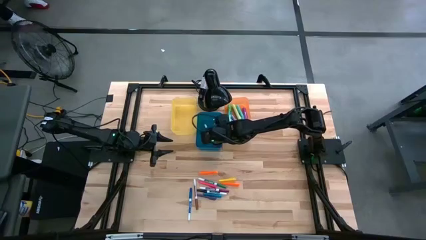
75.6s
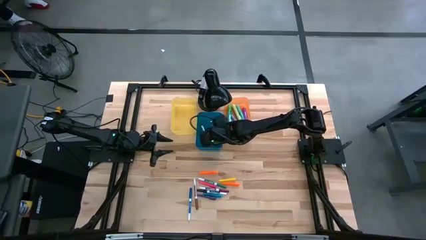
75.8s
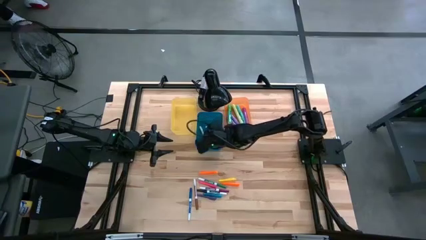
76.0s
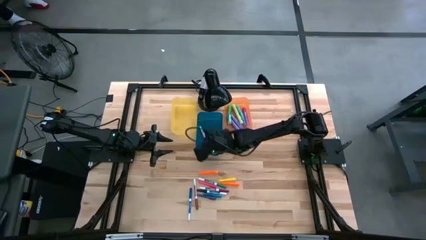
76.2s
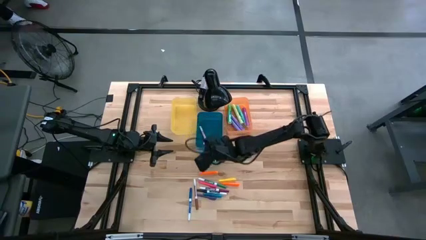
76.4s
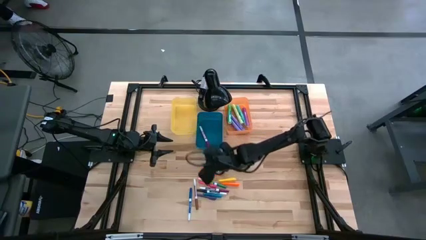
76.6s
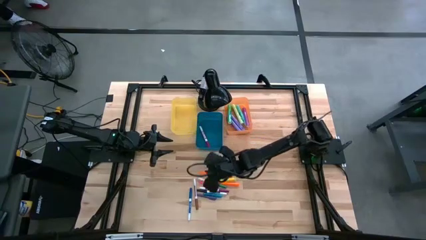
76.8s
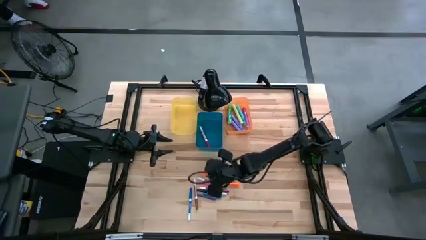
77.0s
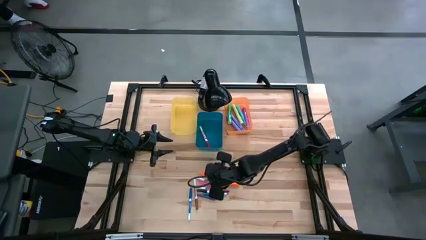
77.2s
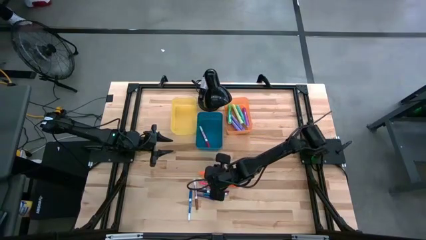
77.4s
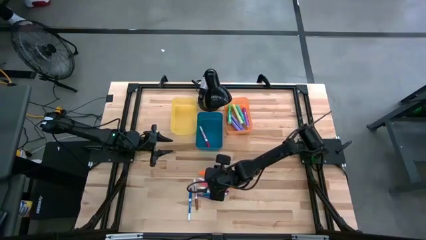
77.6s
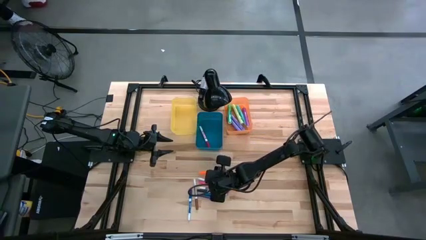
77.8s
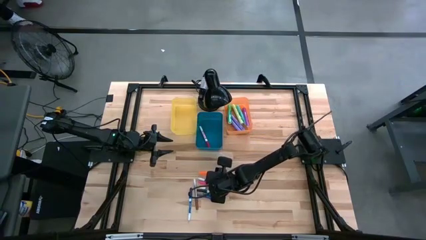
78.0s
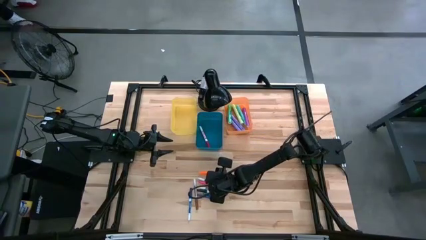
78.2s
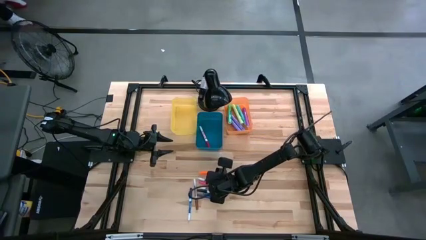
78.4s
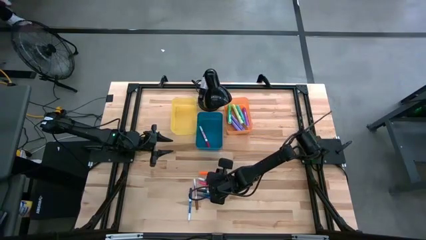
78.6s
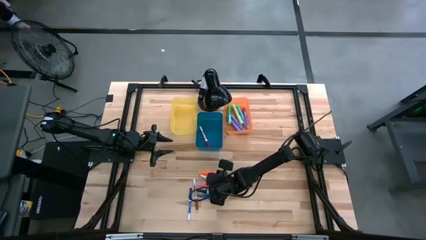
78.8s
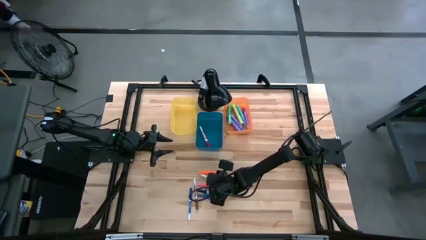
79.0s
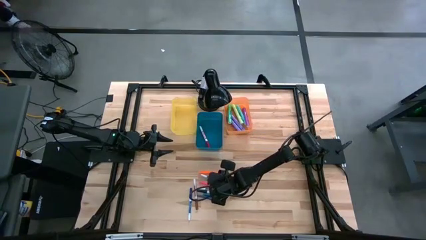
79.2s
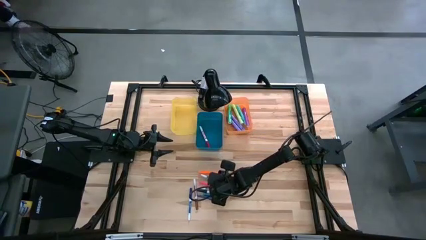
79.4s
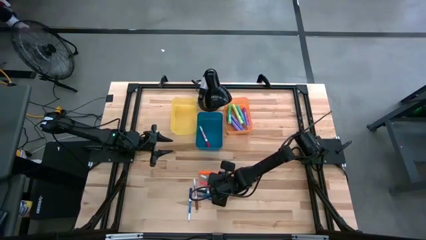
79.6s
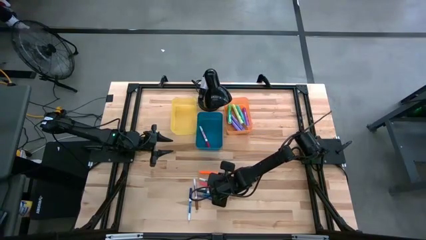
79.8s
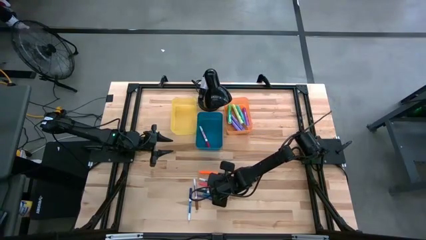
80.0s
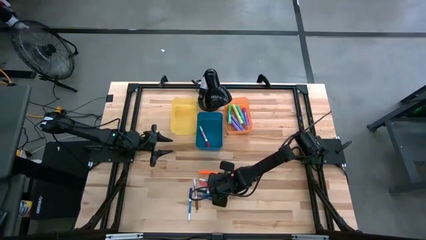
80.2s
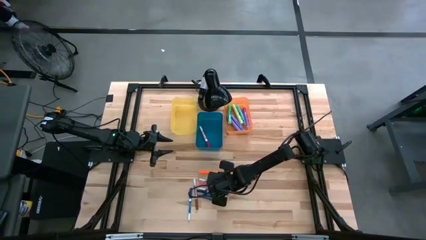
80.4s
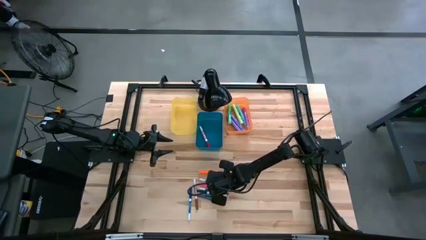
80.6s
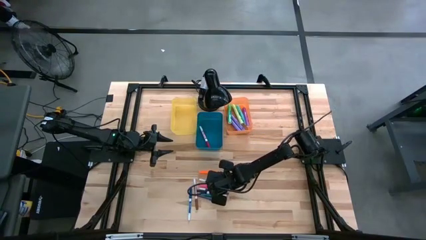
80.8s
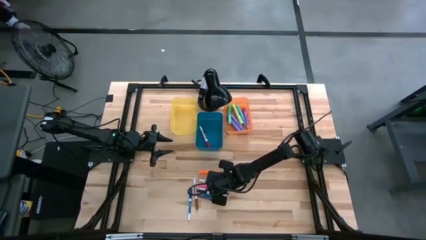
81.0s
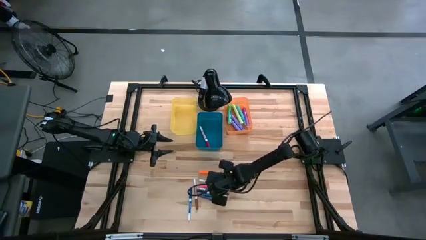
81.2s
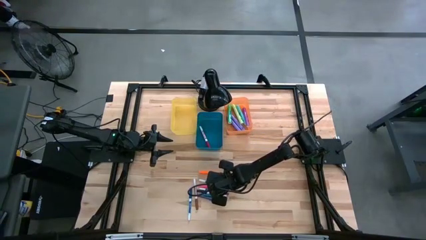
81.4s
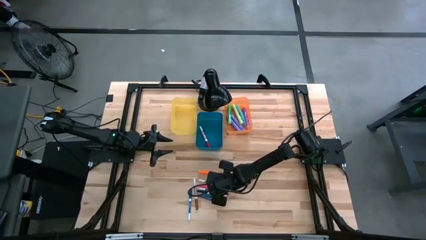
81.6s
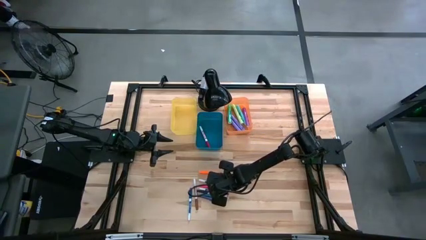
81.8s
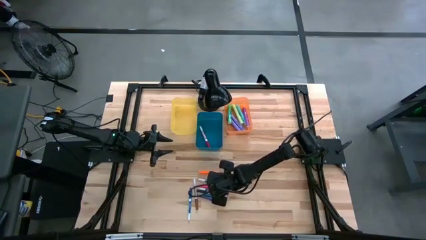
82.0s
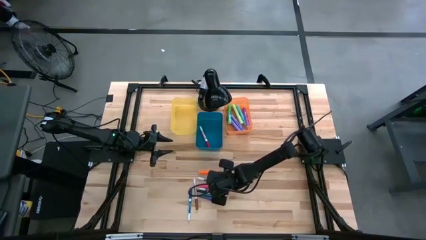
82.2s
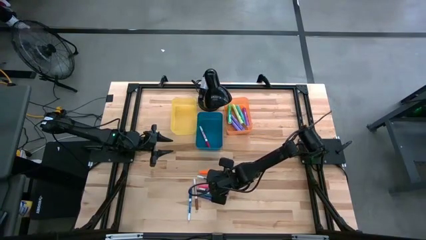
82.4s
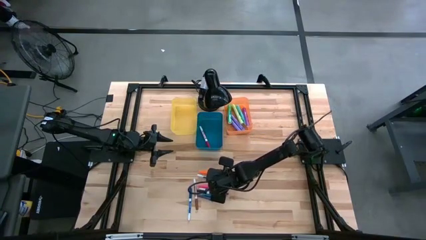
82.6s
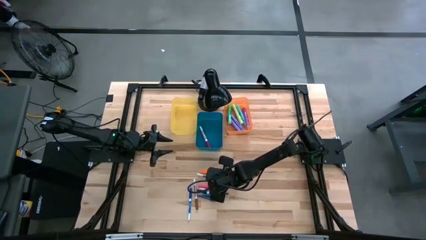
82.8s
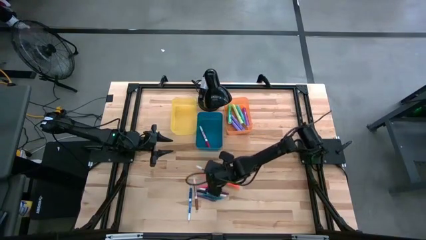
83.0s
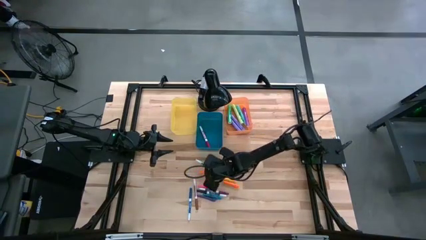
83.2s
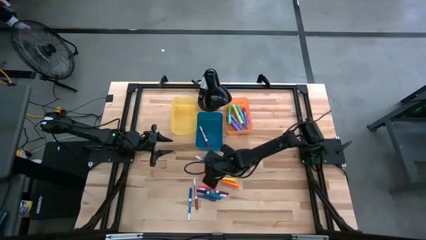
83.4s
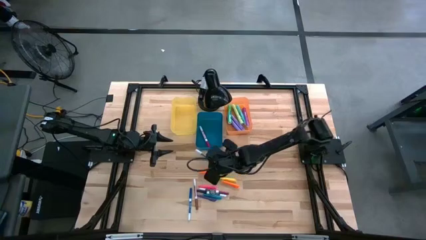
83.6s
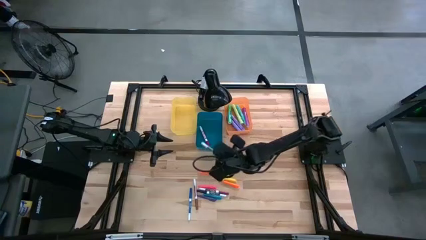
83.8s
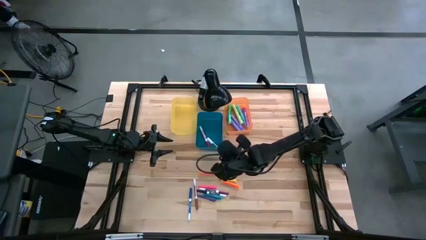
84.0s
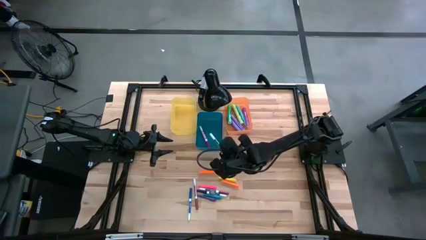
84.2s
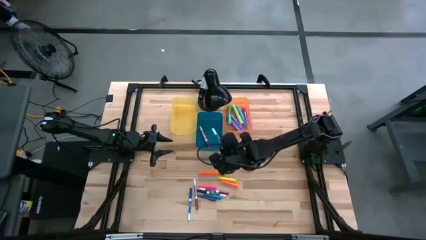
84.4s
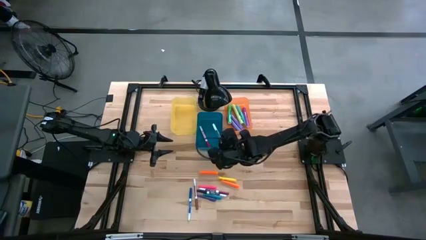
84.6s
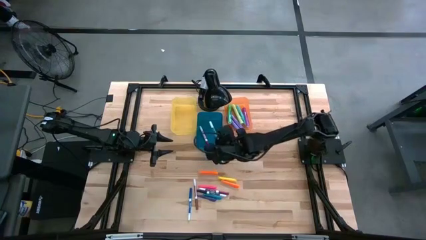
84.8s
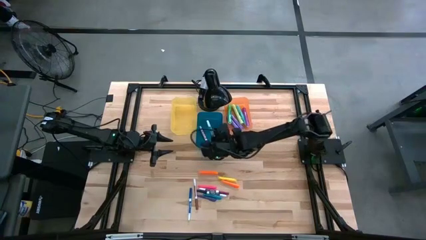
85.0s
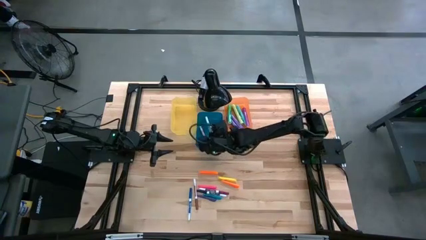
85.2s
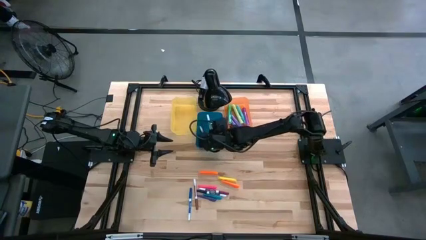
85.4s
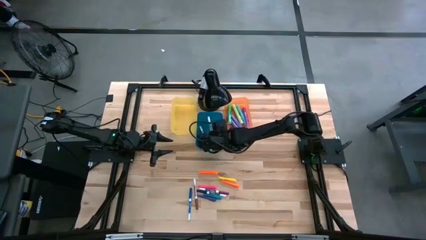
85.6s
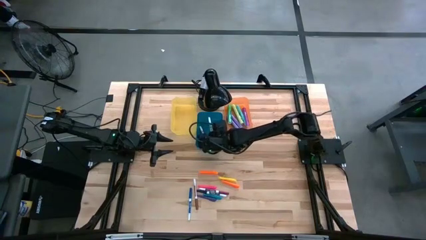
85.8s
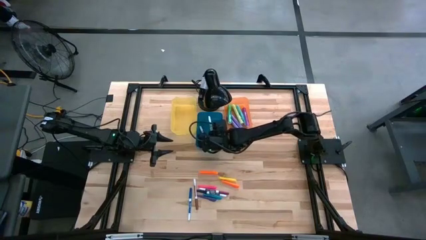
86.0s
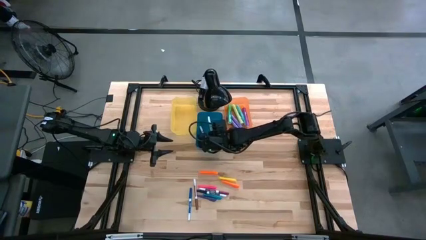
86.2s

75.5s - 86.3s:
Task: Pick & Place Markers
Put the green dry erase marker into the blue bin

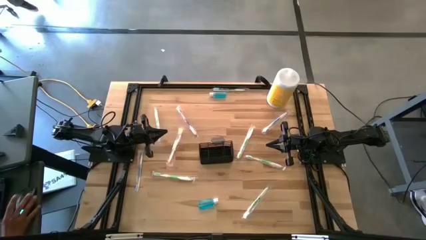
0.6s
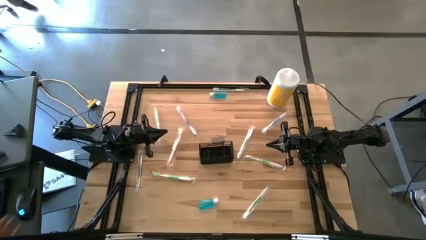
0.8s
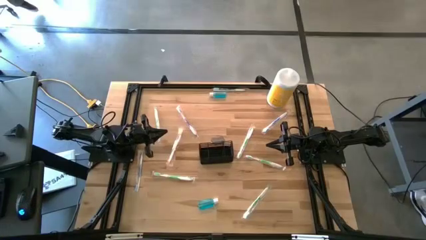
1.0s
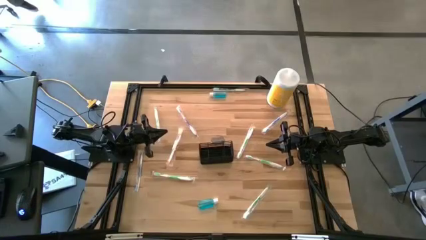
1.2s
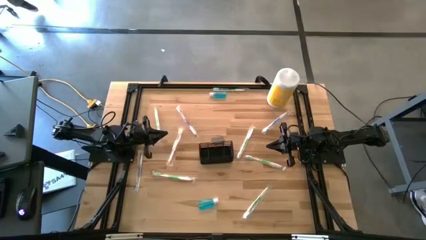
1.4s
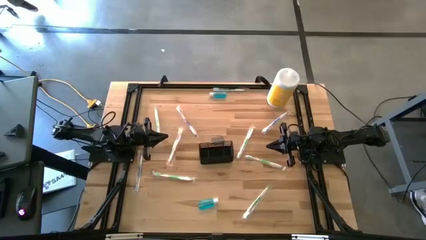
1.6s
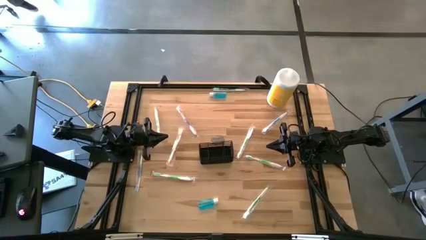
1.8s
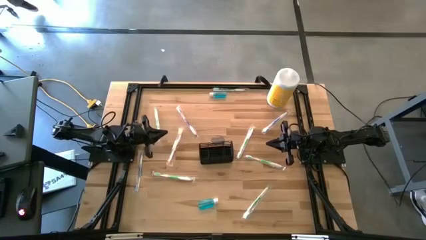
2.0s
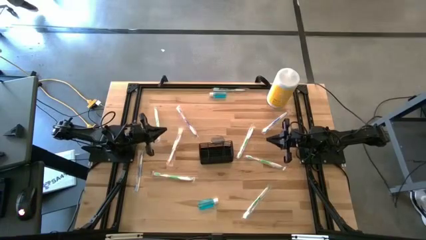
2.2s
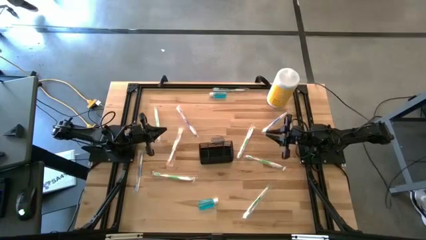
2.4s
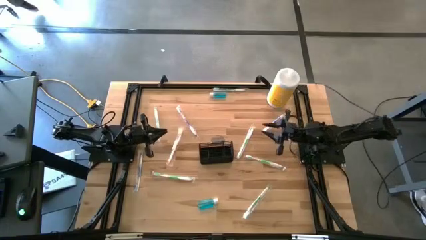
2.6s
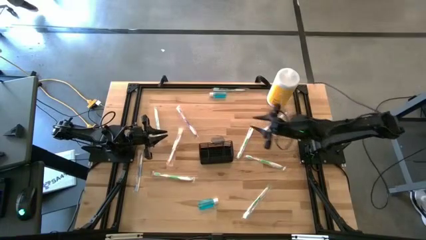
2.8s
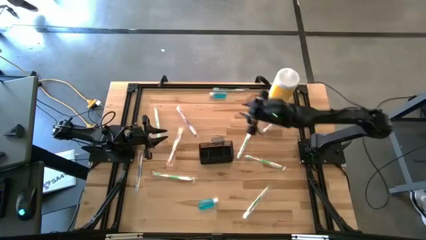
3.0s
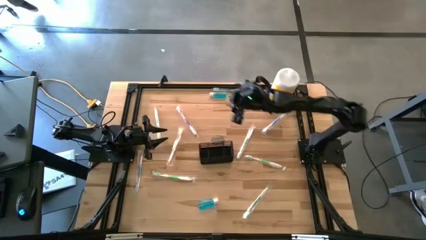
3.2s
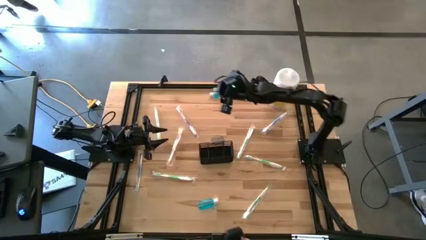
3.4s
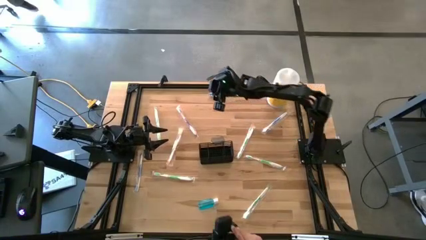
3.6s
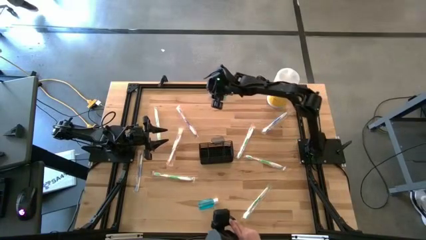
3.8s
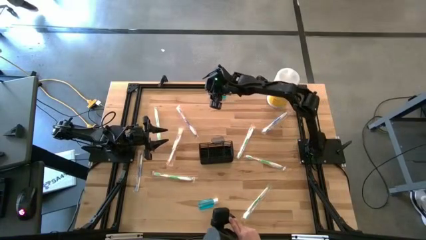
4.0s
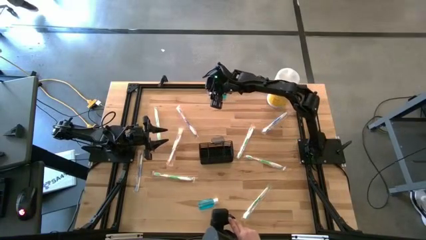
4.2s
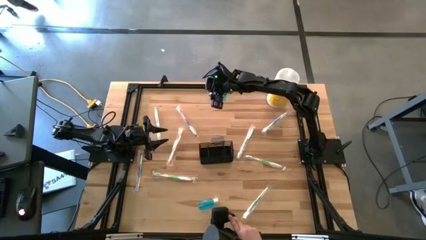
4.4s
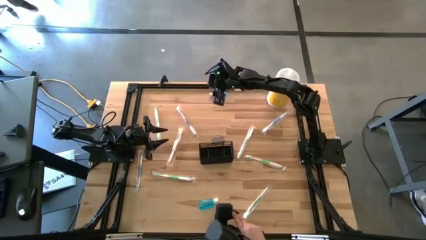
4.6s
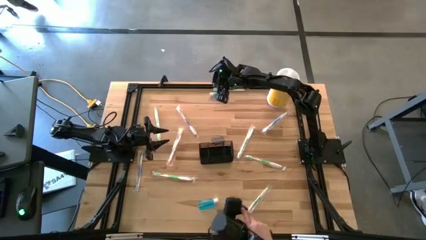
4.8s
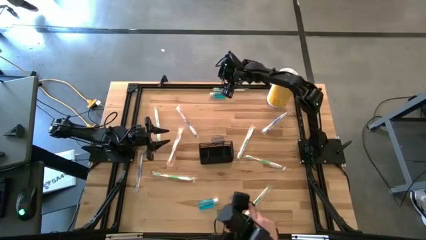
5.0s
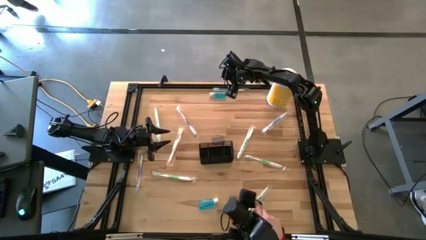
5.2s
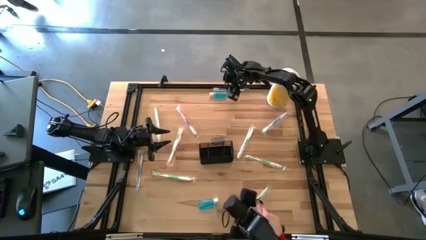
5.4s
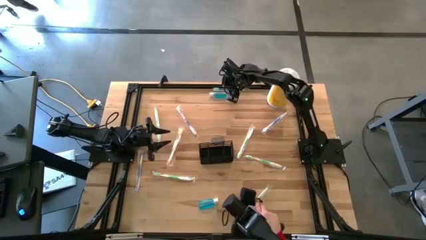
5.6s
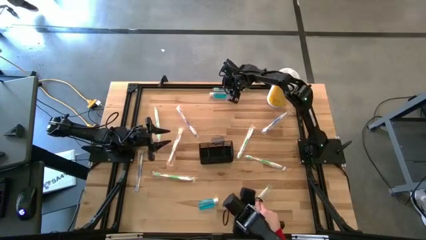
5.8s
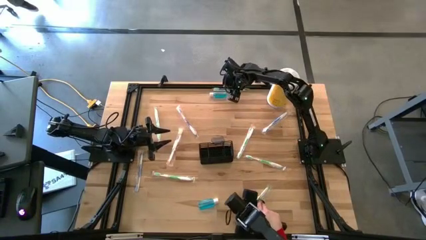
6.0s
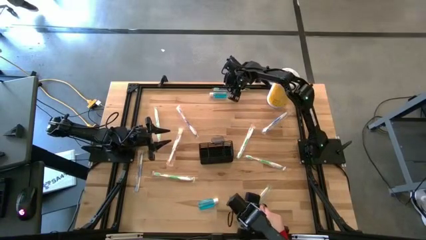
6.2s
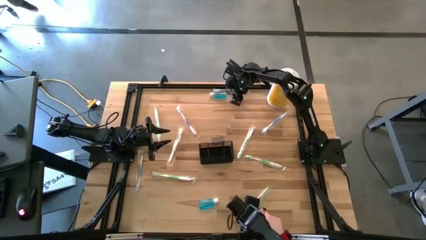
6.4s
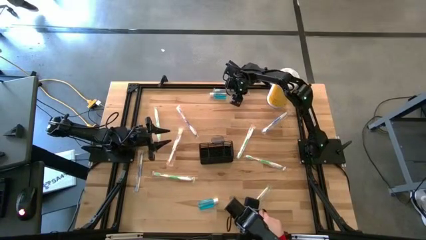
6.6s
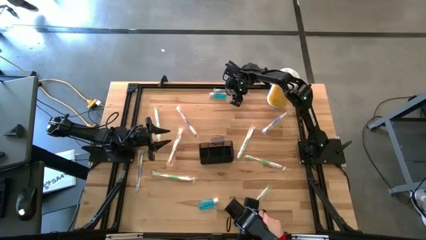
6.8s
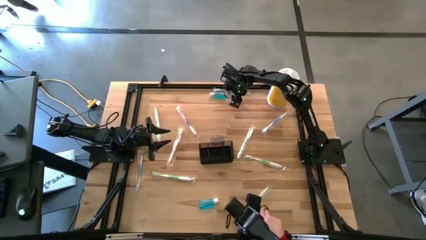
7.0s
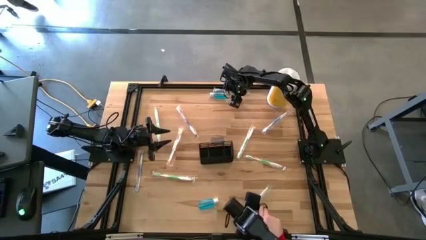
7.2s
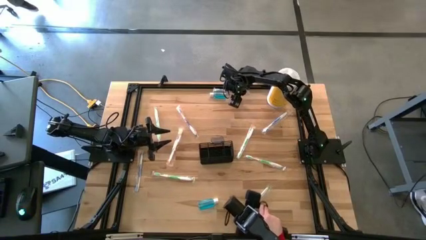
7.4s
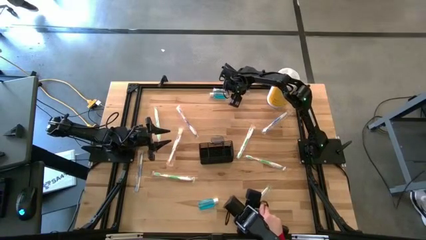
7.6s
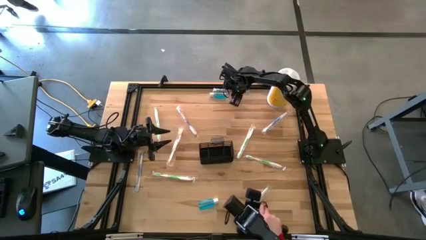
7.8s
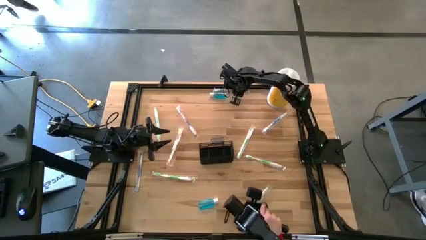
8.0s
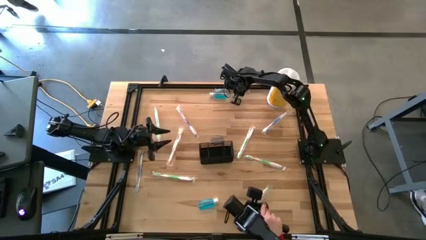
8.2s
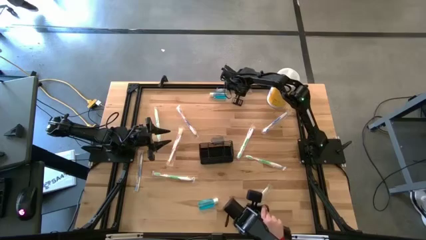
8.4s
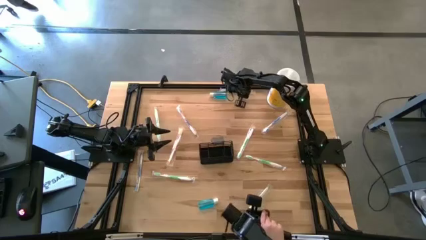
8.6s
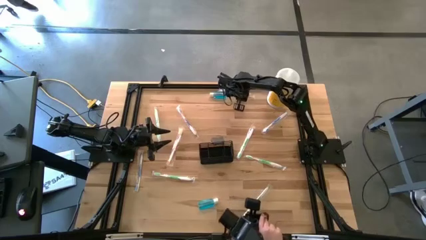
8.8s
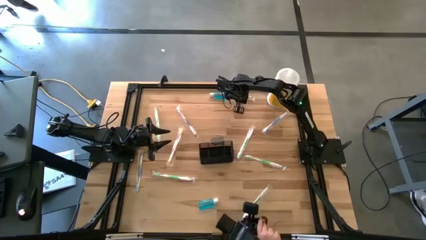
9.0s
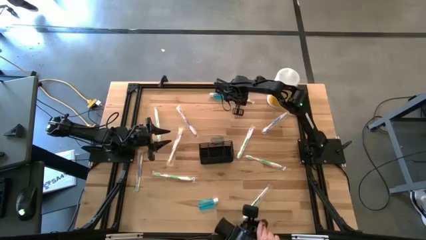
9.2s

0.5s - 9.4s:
Task: Pick & Place toothbrushing station
Put the green toothbrush into the black mesh organizer
